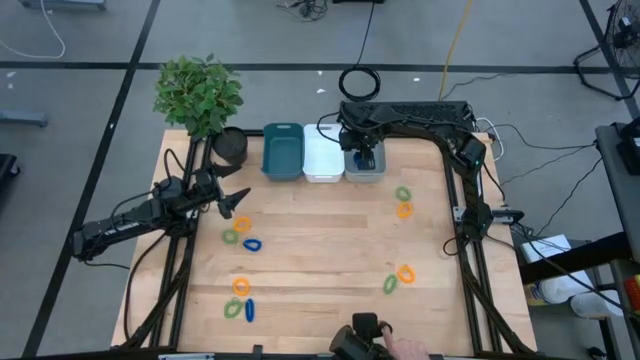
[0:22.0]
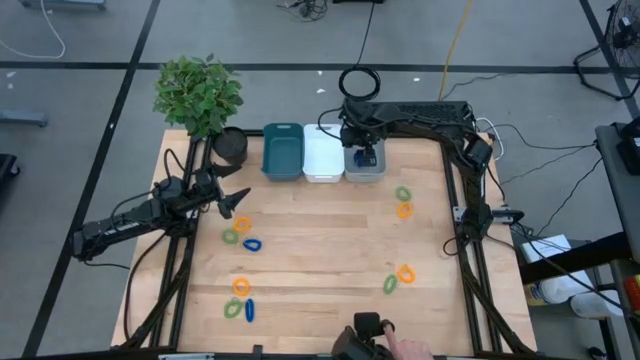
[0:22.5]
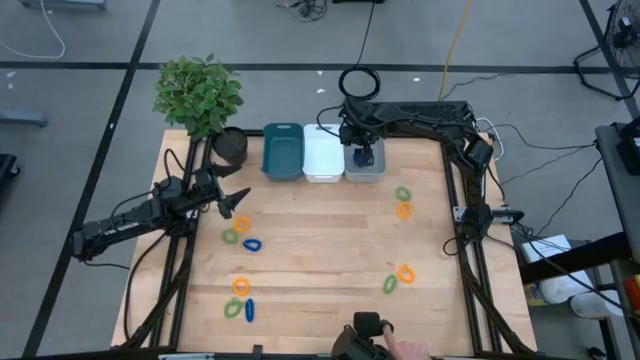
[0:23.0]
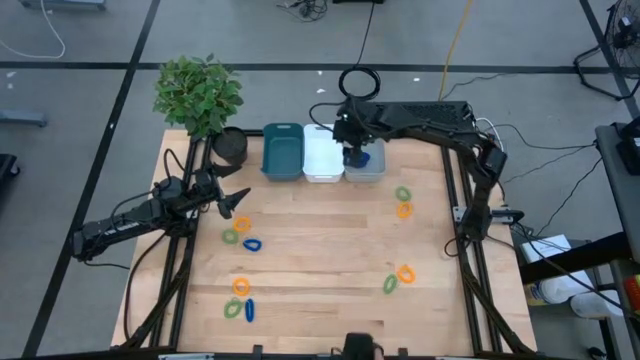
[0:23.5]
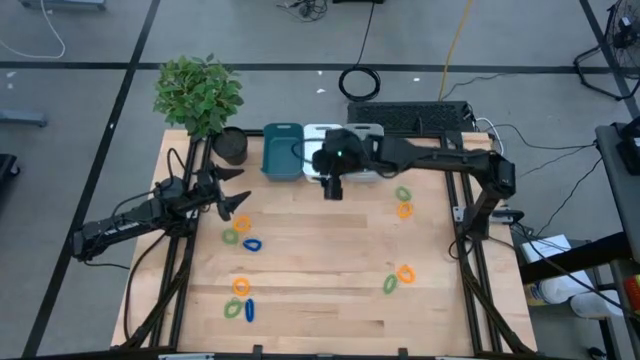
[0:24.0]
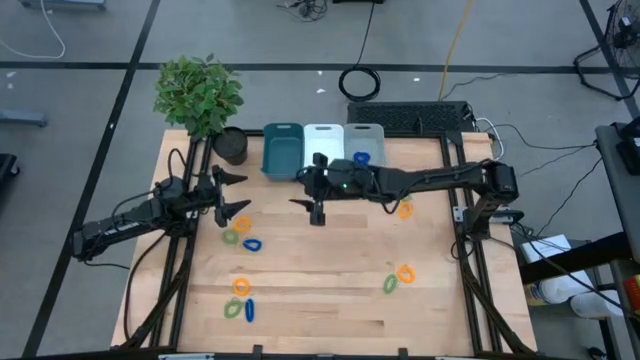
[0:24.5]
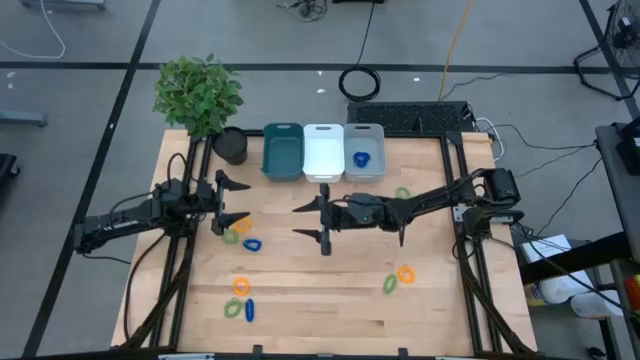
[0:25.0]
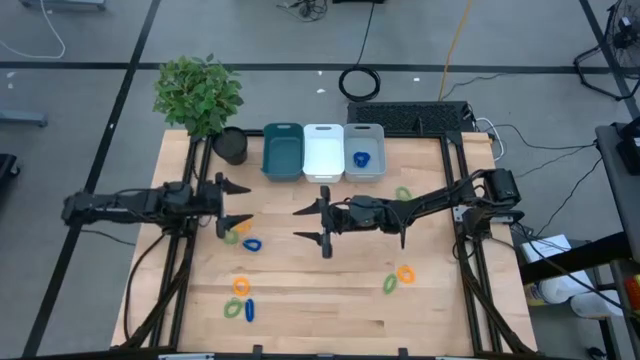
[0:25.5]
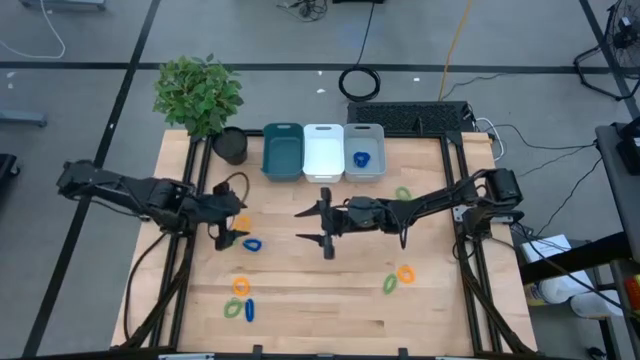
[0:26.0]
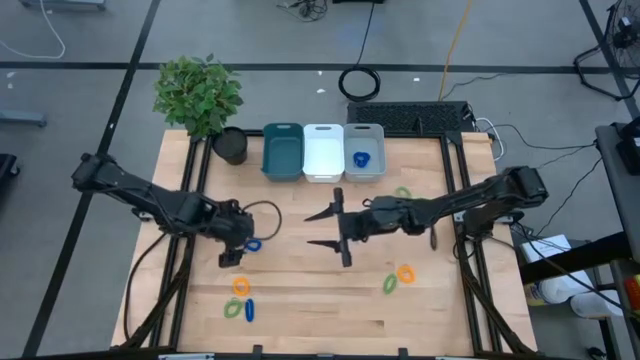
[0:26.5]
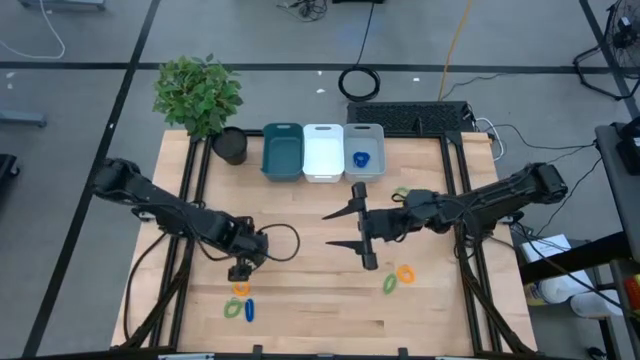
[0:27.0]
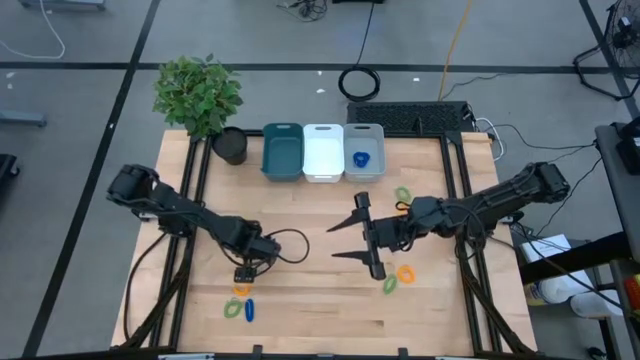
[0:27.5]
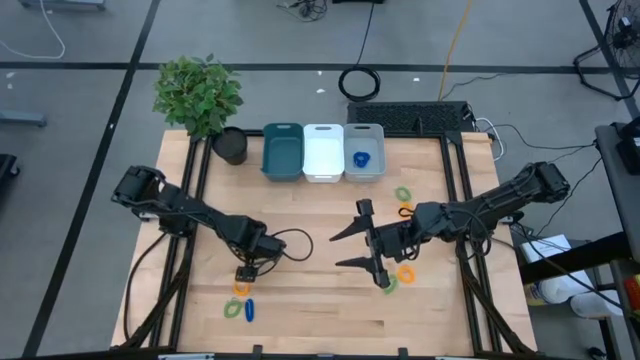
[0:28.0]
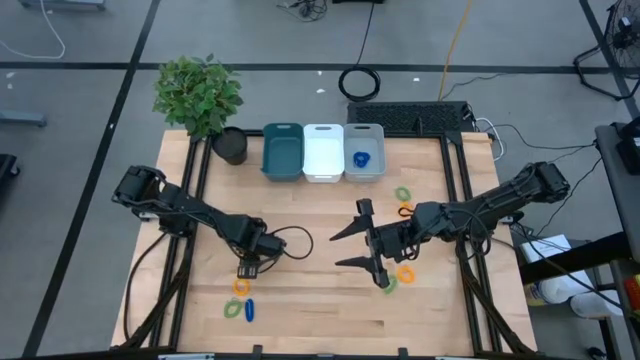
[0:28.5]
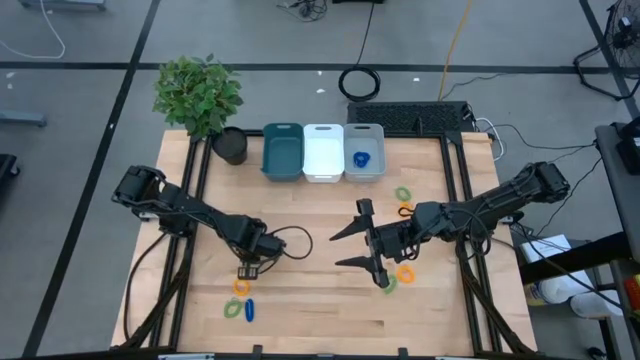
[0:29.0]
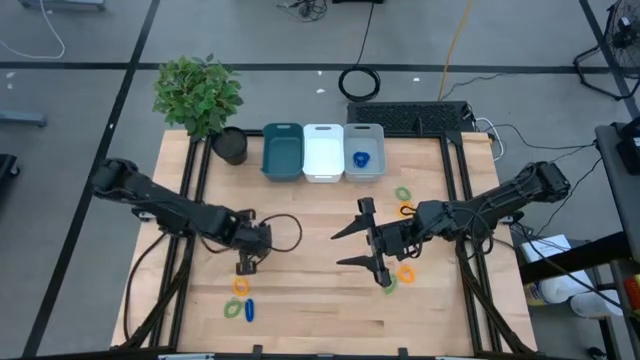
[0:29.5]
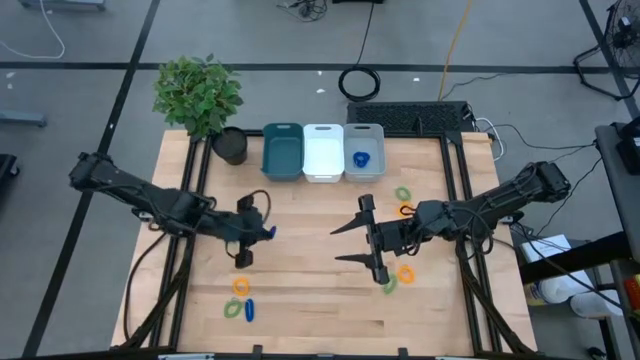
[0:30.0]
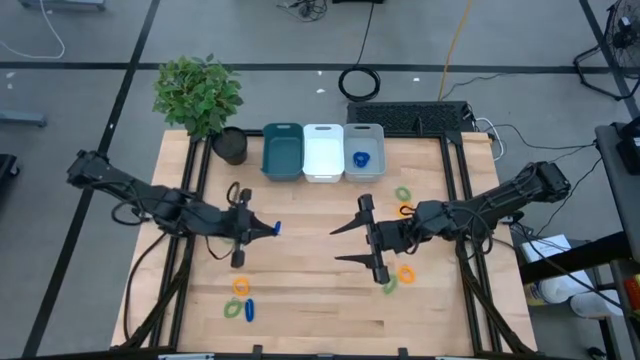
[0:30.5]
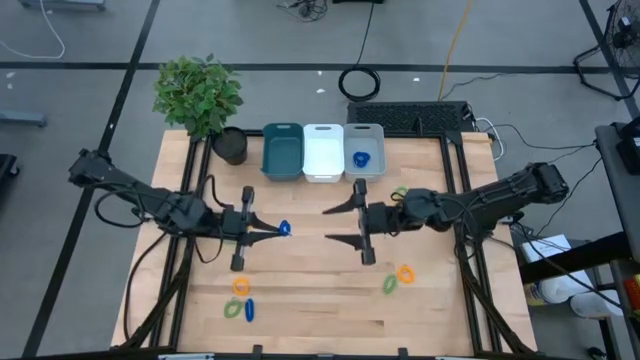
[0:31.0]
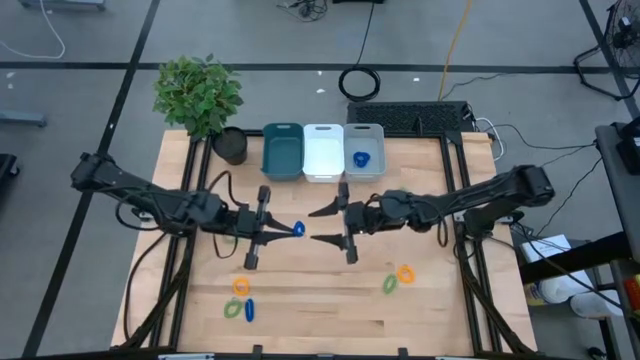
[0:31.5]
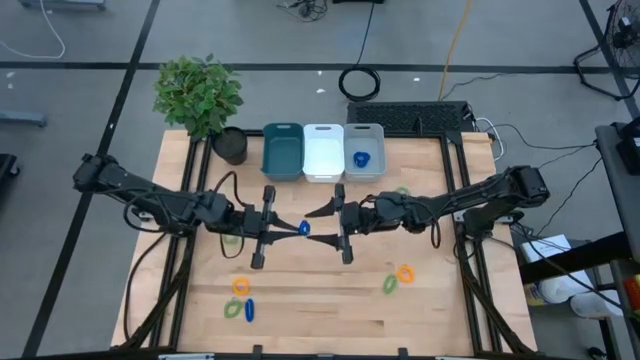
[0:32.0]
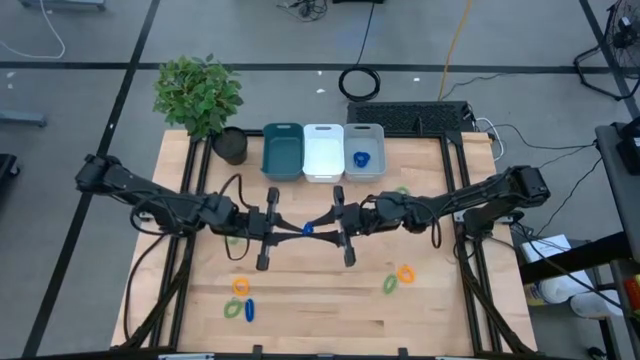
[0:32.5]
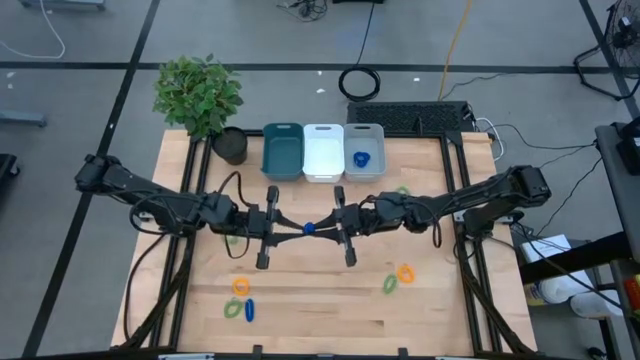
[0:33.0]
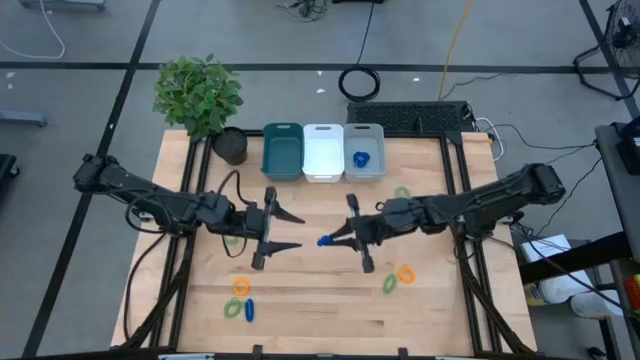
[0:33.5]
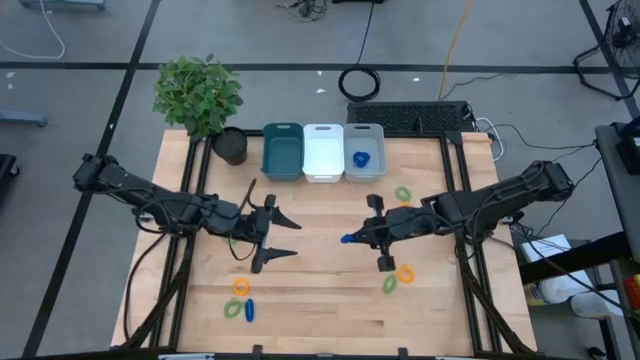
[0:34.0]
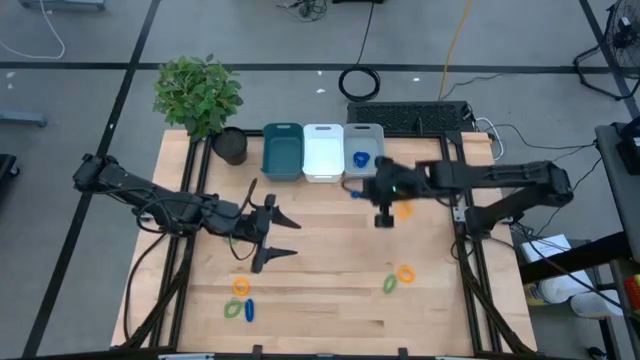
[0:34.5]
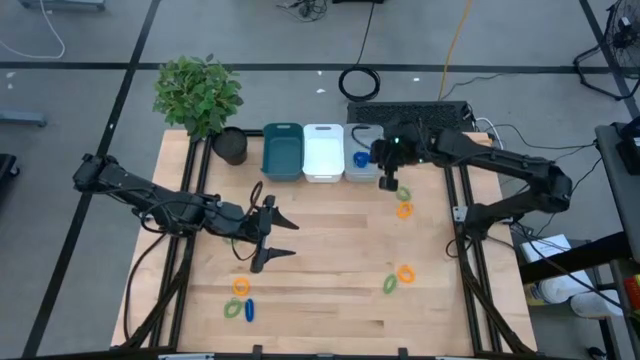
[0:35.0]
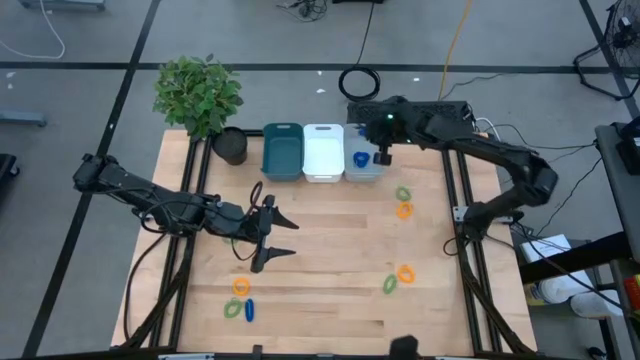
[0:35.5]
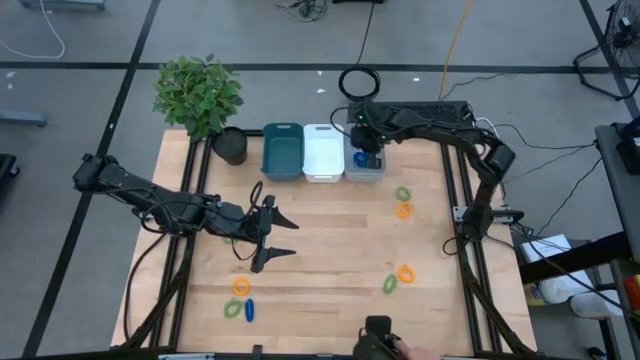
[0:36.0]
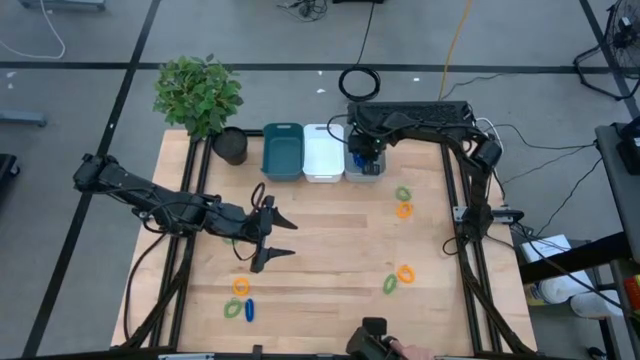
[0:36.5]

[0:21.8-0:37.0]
Task: Sort spring keychains
Put the blue spring keychain in the gray bin

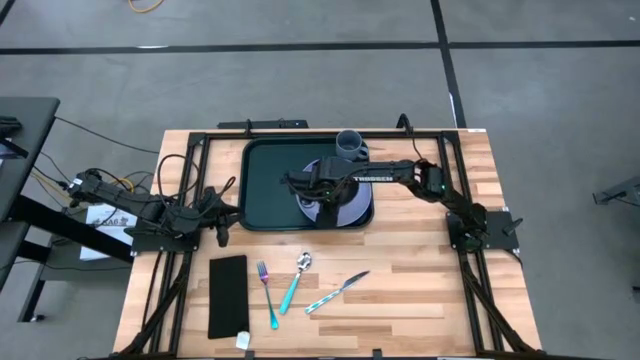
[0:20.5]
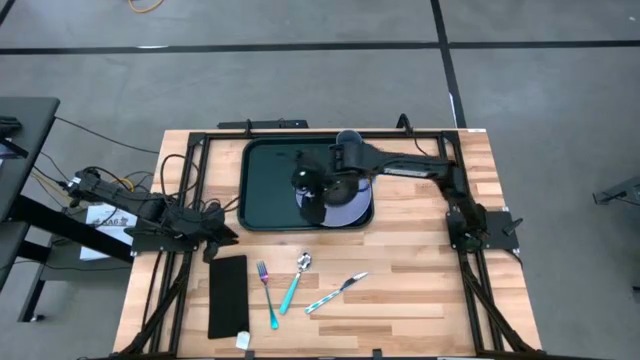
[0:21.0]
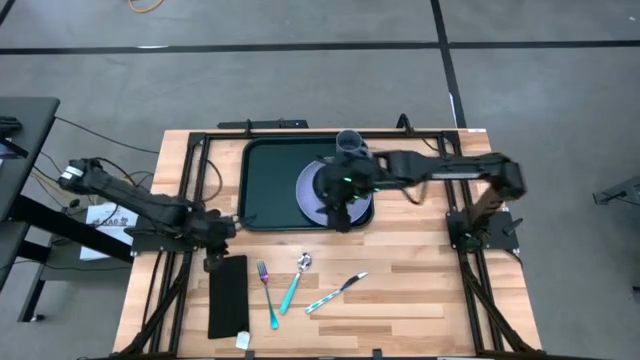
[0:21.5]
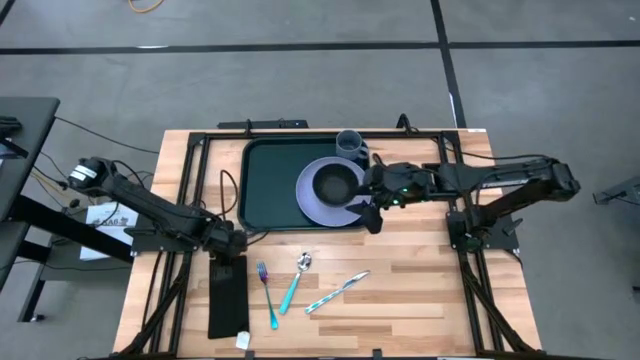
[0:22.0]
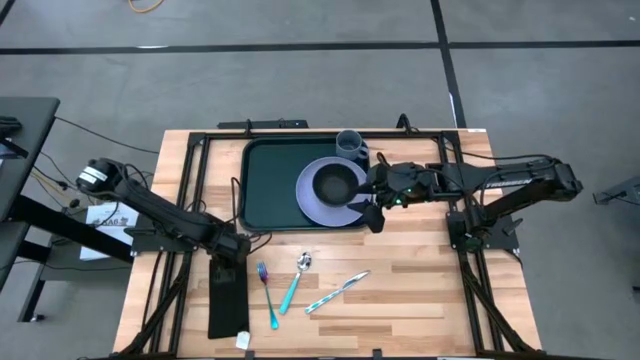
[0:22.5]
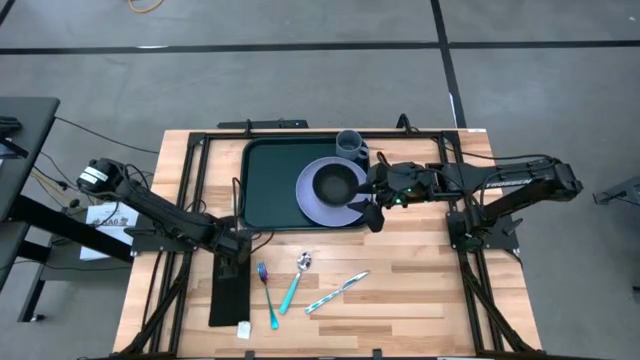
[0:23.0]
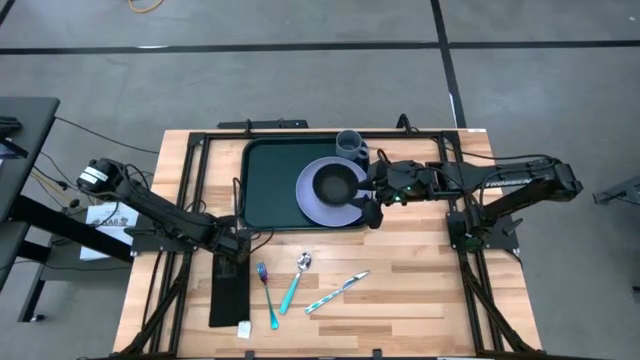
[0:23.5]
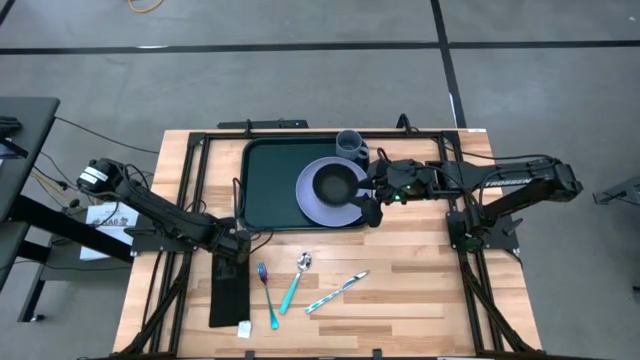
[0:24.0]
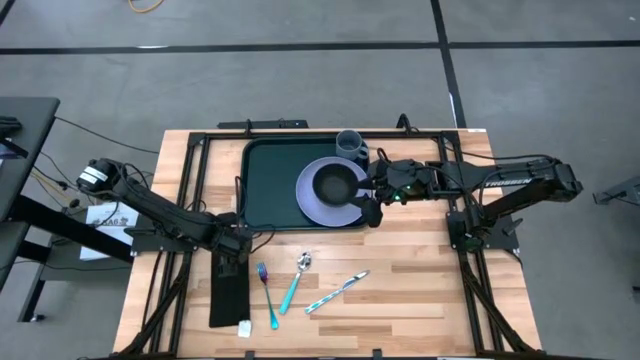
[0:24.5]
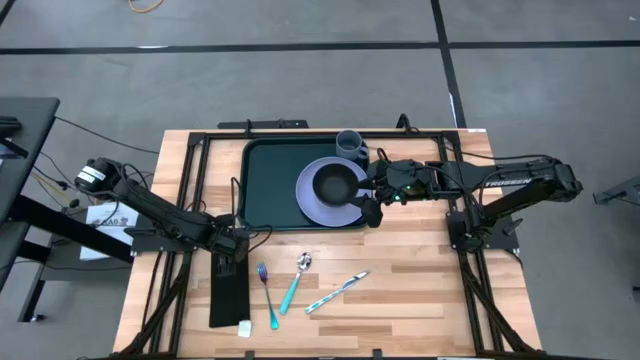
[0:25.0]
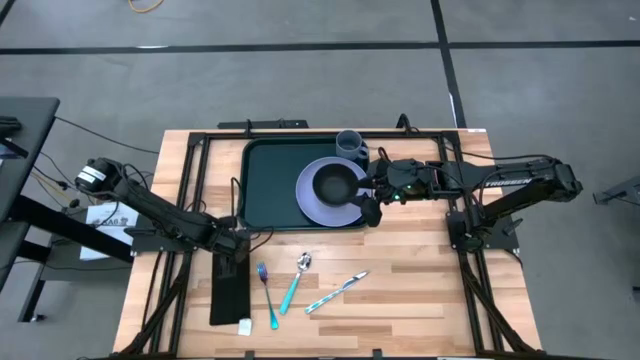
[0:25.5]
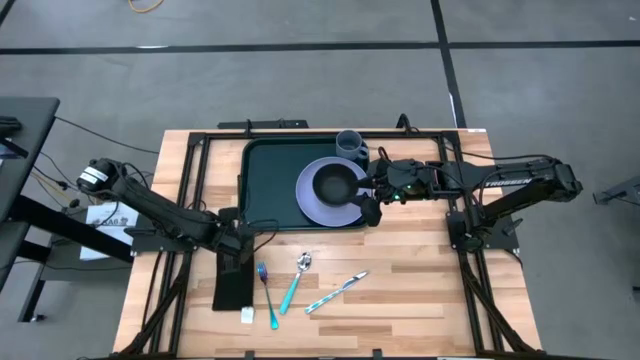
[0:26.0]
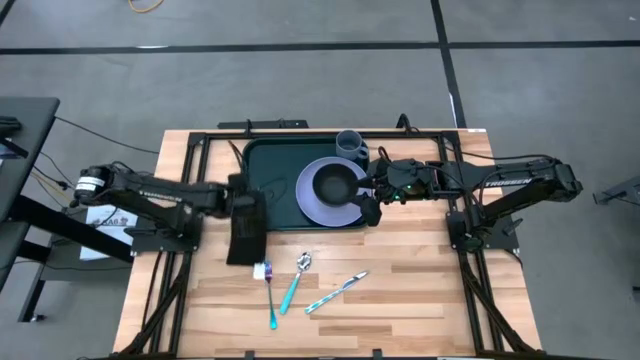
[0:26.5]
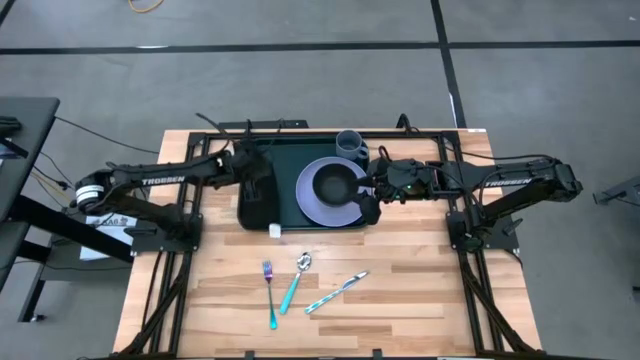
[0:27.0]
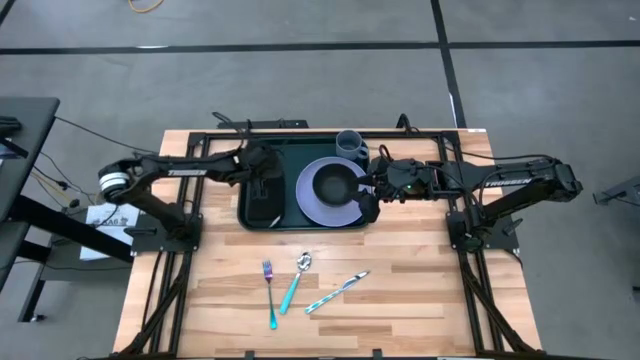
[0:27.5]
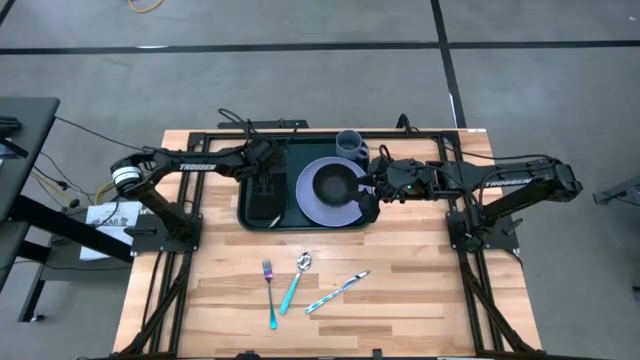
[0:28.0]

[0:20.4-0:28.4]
Task: Set up tray
Put the black napkin on the black serving tray to the left of the purple plate
